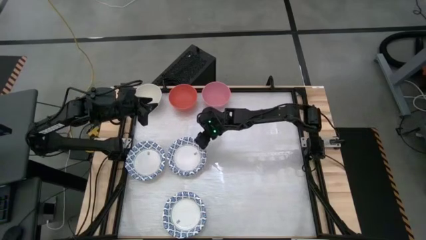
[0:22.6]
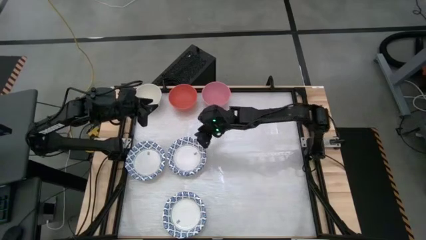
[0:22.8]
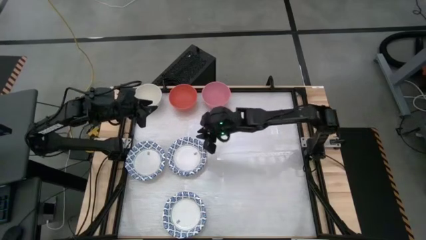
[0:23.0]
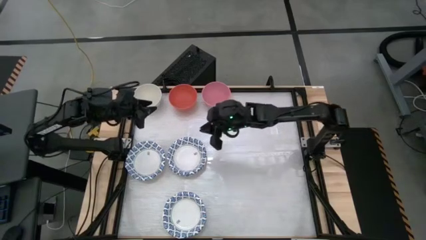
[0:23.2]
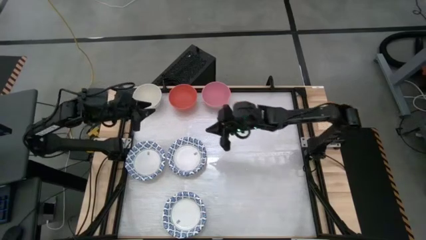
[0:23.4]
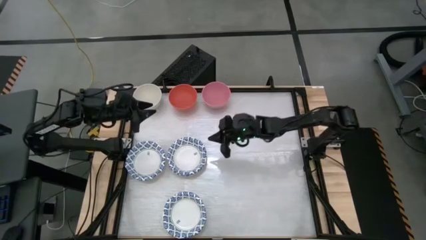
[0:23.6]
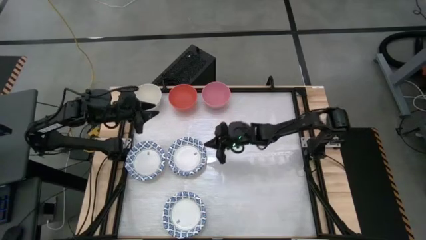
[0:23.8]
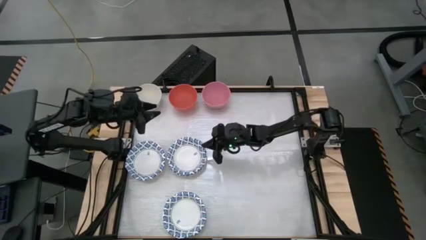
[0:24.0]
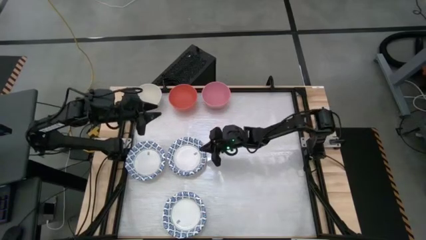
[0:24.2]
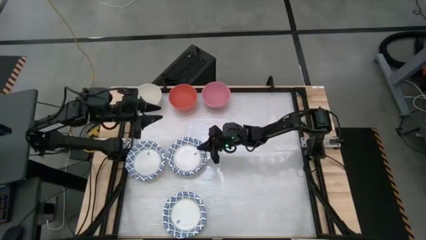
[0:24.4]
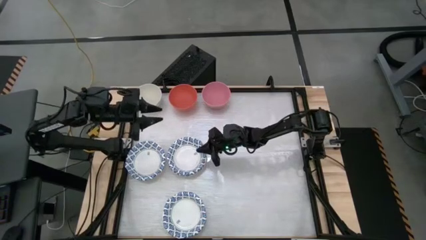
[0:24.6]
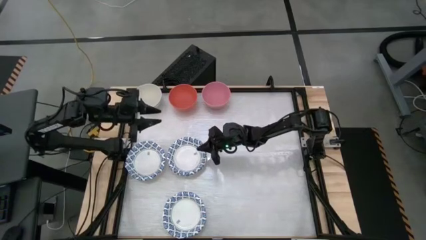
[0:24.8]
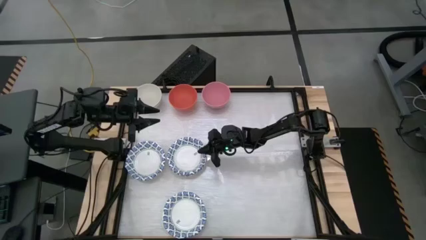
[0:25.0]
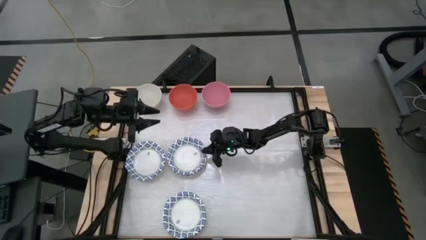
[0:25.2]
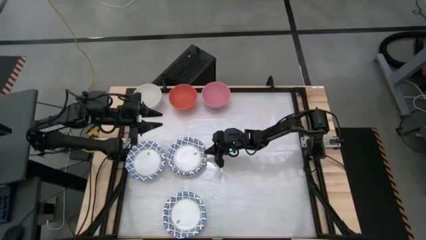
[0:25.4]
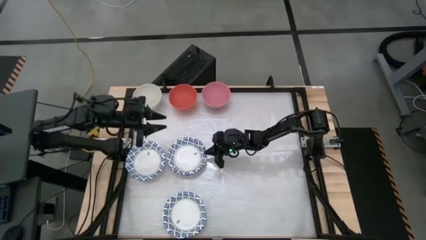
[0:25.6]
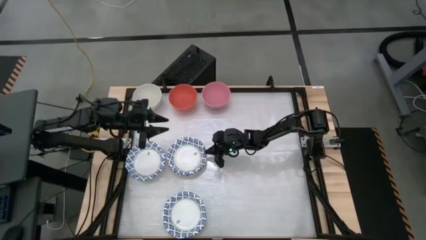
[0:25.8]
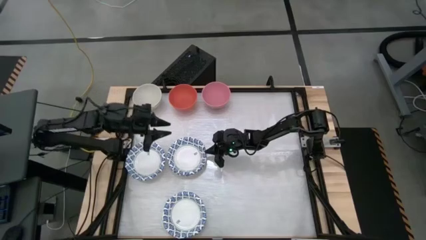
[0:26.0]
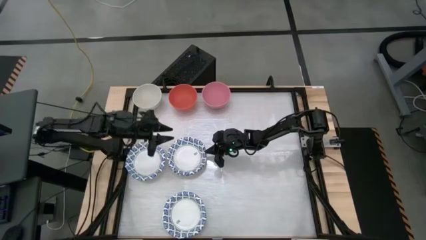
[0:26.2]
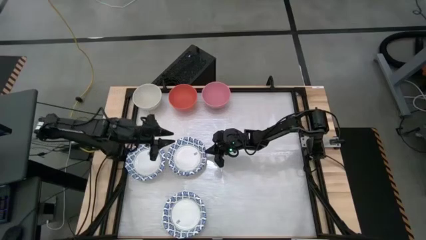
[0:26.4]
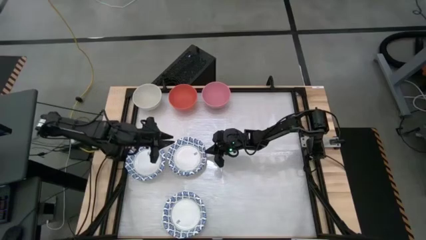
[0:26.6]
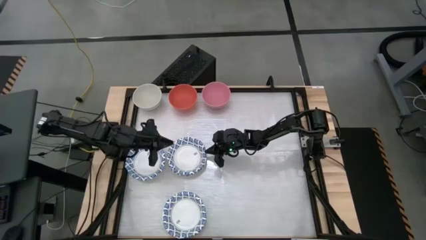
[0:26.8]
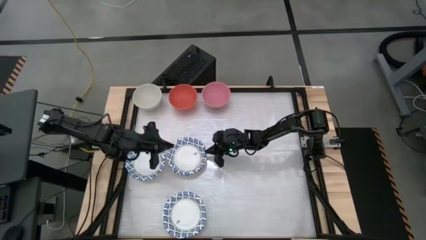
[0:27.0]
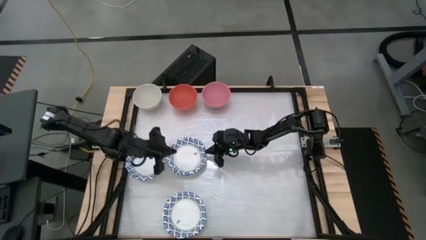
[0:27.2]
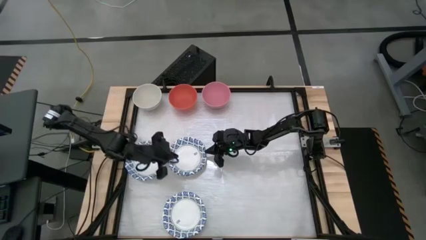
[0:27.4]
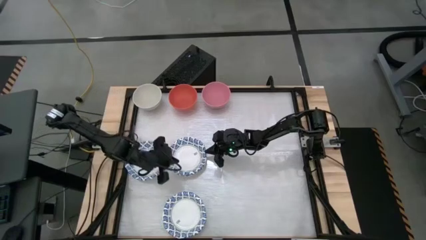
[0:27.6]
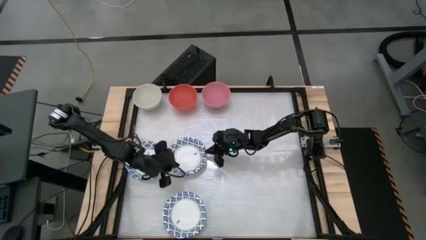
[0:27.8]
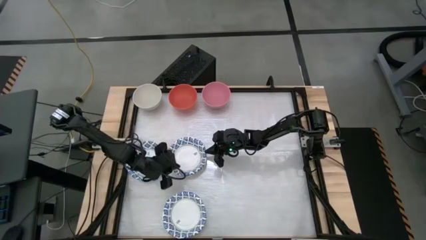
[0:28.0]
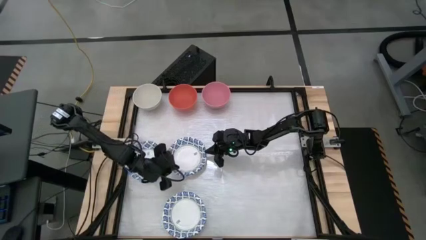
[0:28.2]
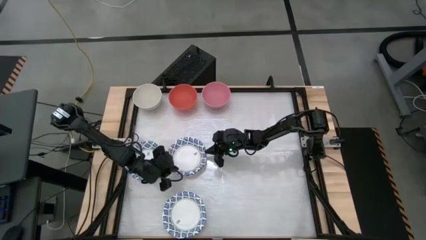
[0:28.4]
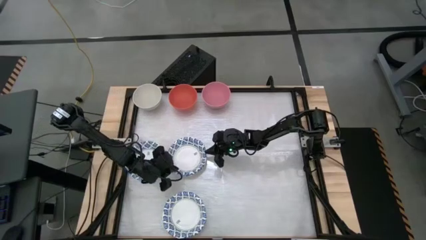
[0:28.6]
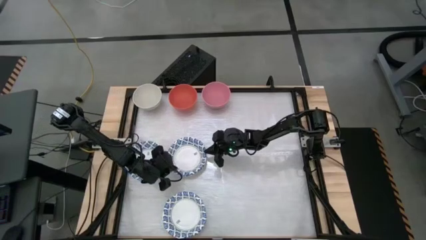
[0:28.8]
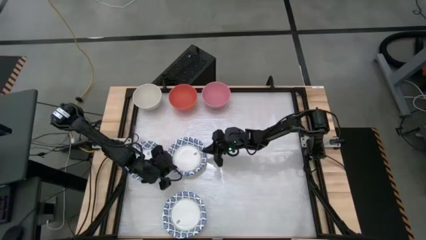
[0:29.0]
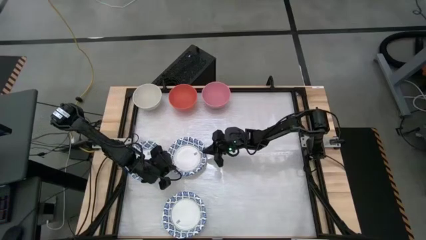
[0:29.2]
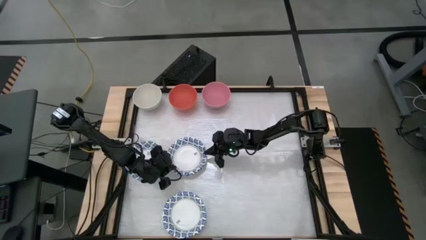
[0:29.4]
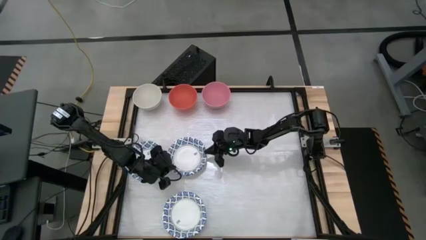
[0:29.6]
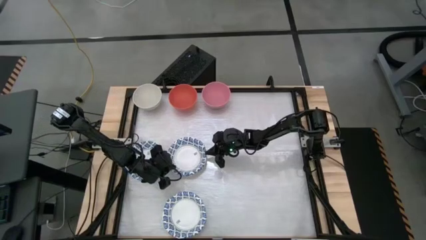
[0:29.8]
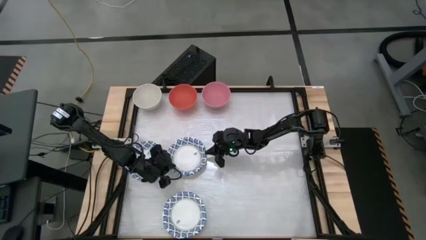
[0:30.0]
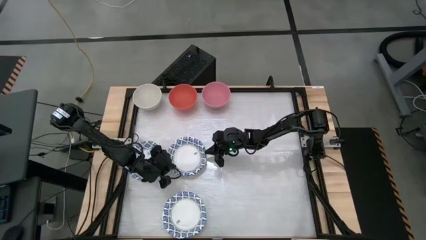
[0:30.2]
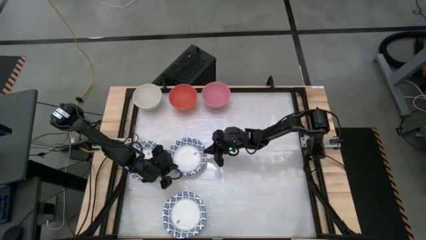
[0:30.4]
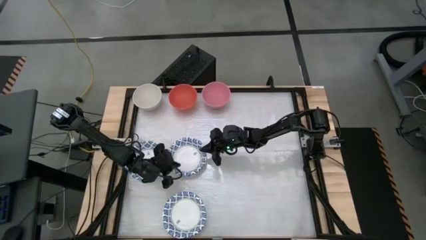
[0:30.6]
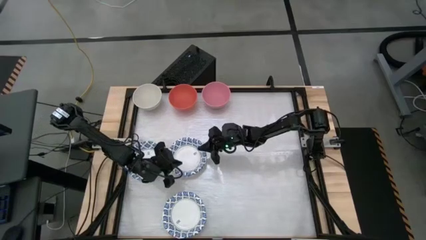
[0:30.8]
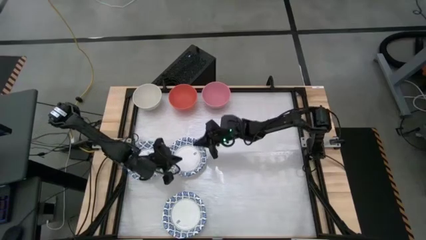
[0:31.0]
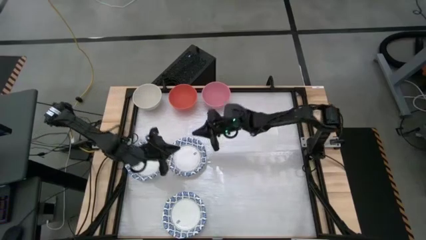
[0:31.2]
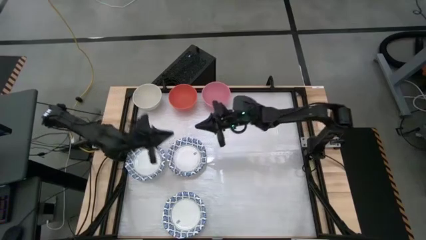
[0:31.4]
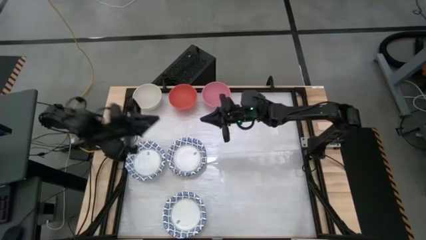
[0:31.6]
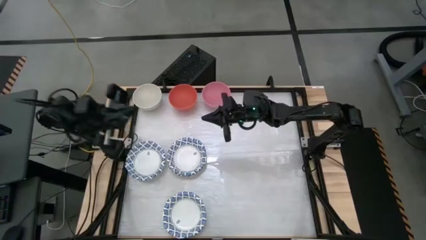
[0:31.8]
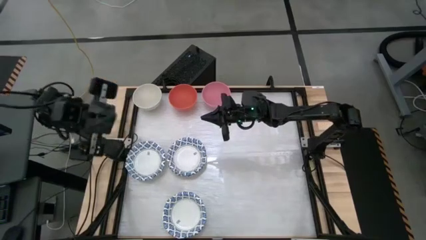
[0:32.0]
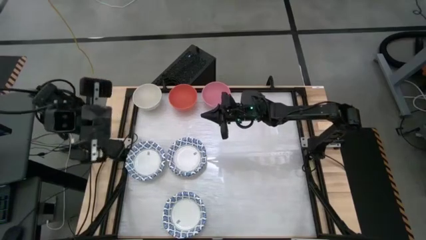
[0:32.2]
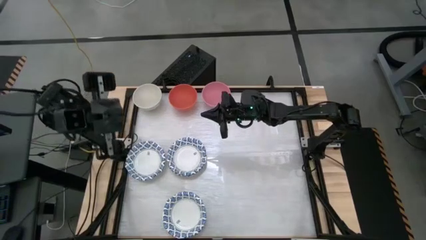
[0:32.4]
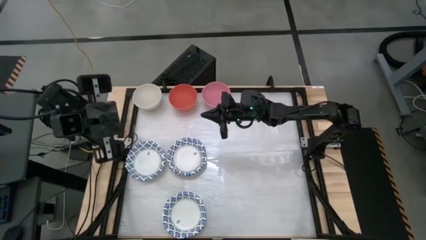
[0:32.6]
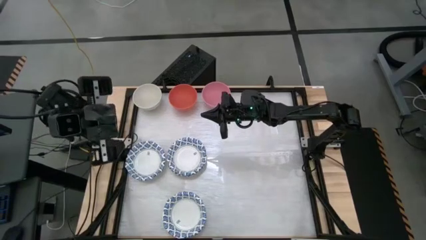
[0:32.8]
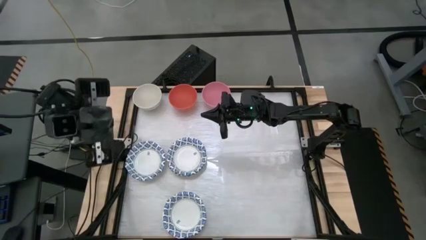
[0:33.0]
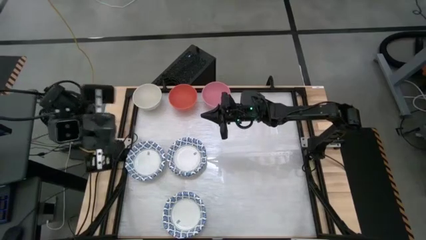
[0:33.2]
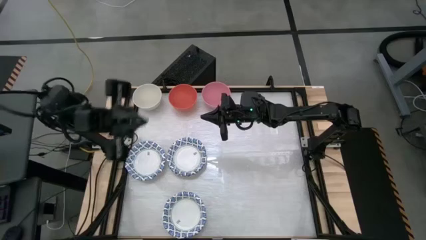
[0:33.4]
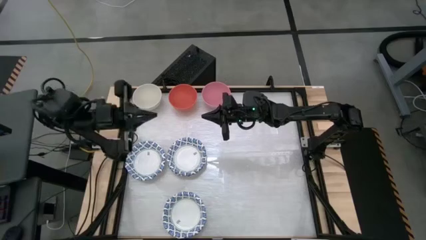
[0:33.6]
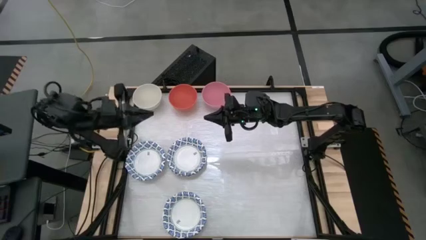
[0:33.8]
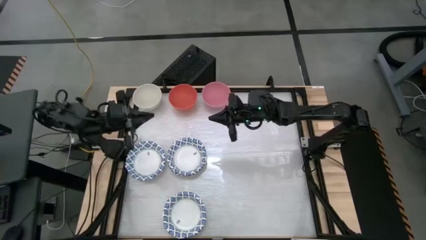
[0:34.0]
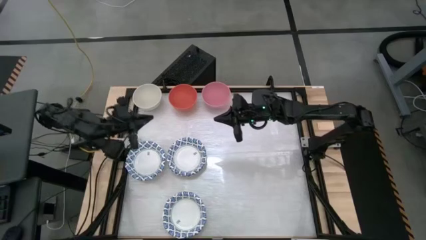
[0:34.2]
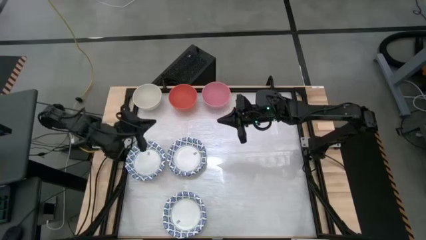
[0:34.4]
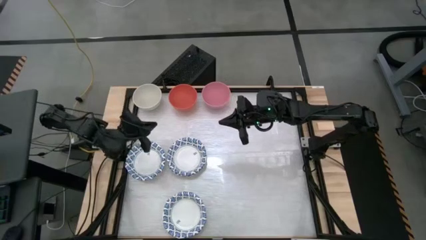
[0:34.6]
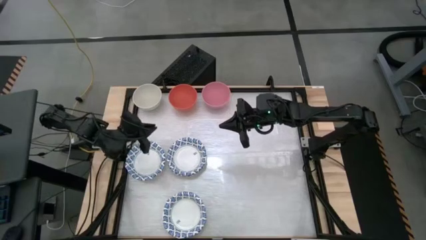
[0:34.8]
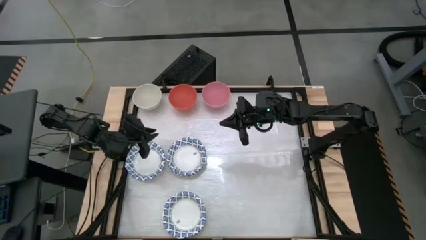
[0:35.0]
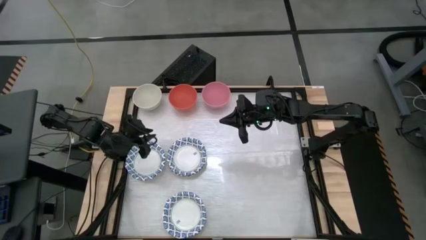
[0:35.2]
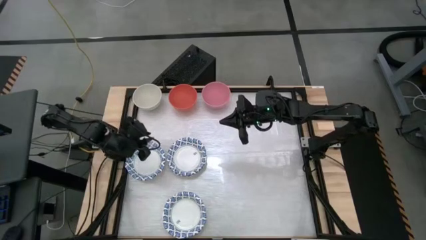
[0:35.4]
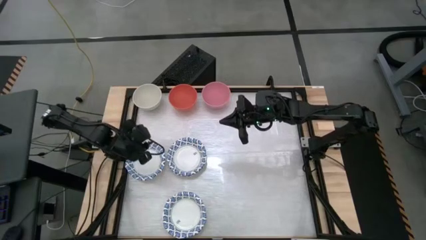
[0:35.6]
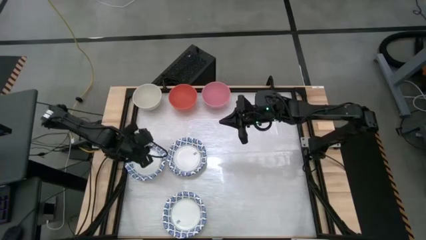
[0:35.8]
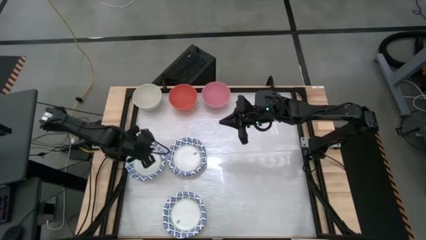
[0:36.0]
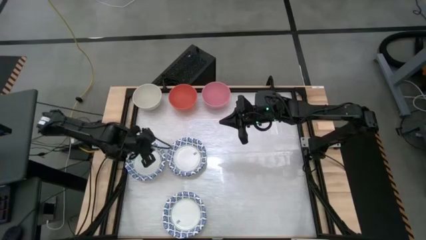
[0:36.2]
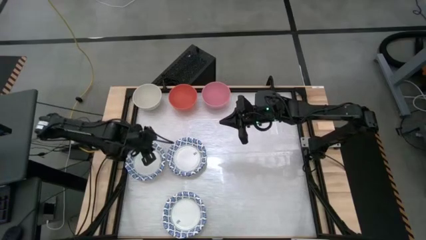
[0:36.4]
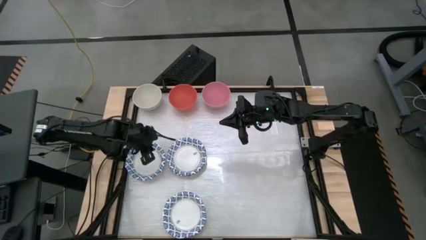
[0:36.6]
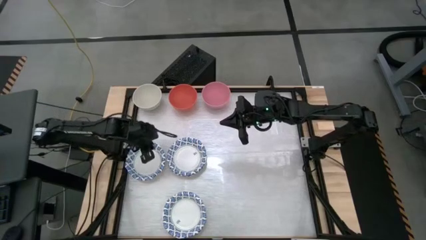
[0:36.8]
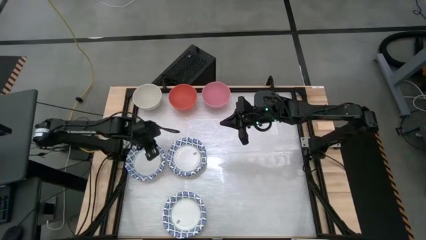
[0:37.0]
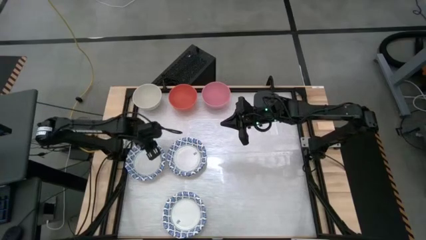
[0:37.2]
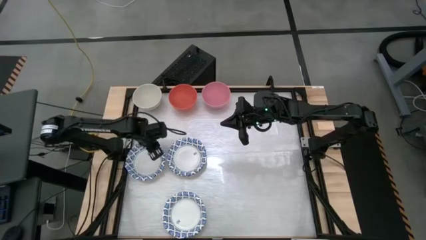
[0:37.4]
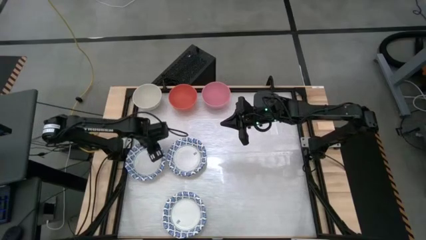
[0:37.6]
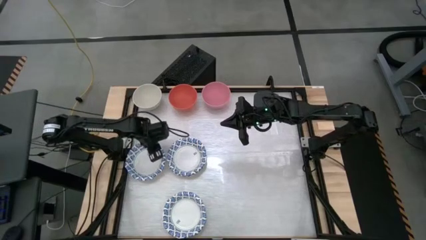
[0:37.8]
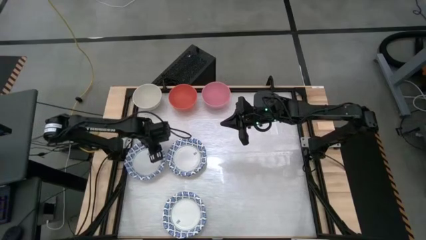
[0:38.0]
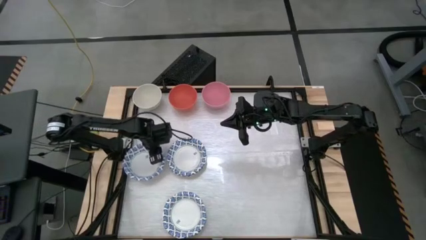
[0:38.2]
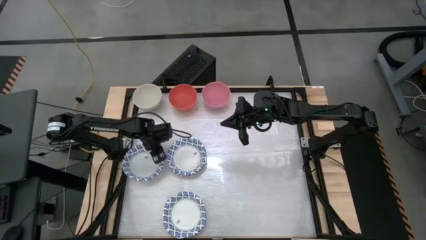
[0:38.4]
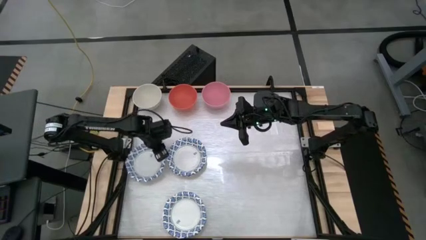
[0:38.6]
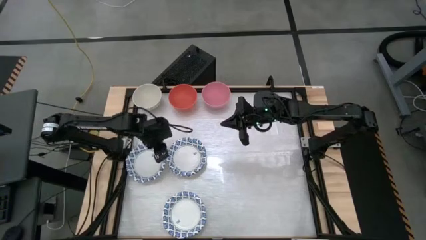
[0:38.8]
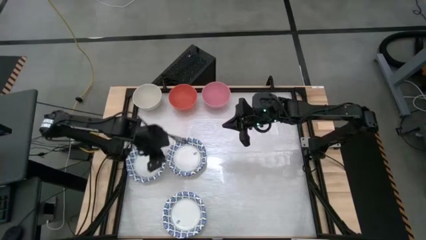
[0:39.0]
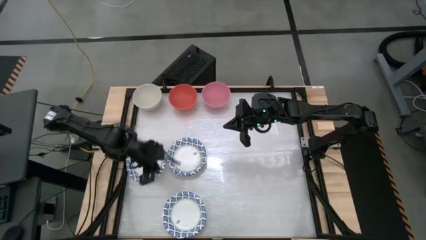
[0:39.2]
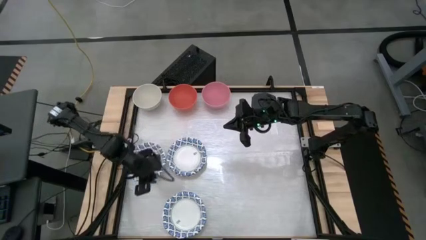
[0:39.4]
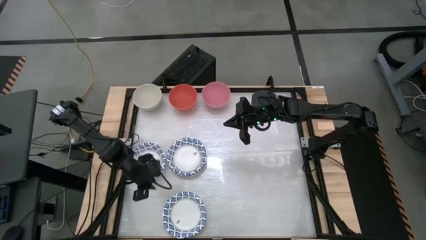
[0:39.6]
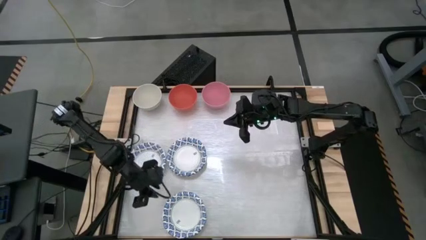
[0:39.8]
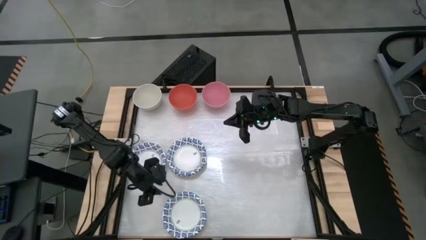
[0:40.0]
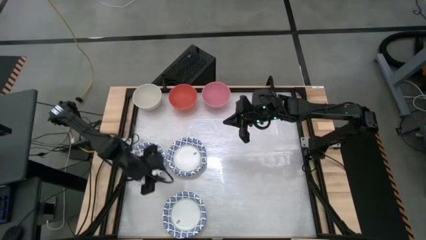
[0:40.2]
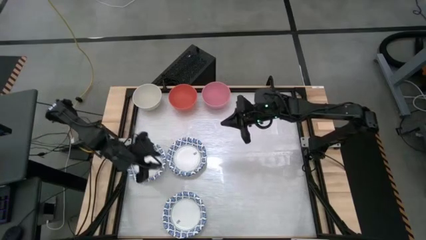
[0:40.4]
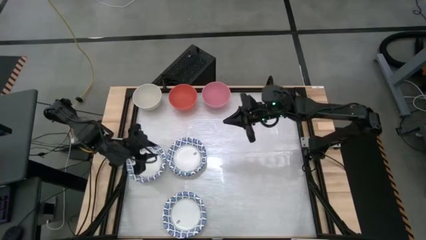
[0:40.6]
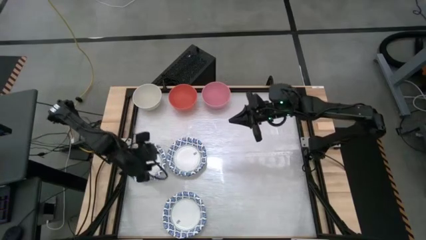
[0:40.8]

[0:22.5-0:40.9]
Task: Nest bowls inside each other by size order
Stack the white patterned bowl on top of the white patterned bowl
